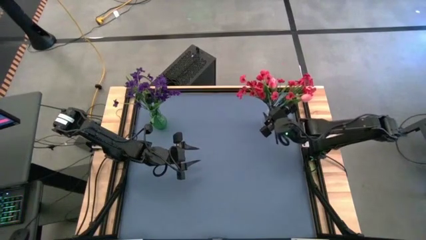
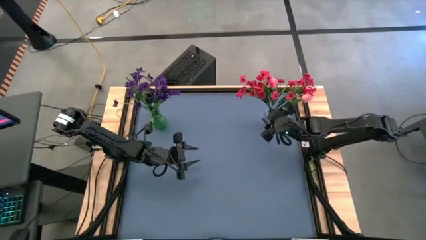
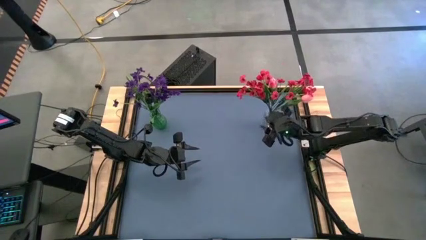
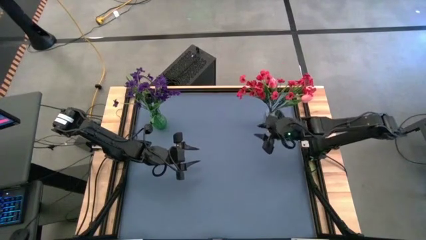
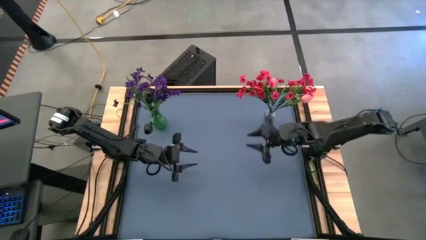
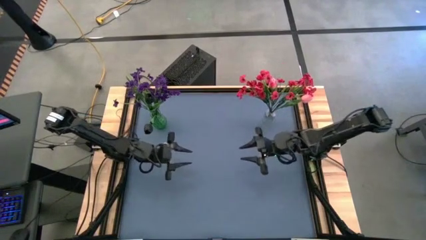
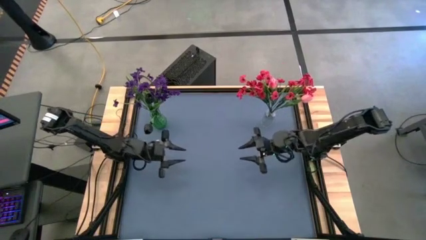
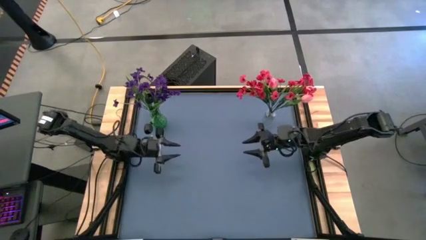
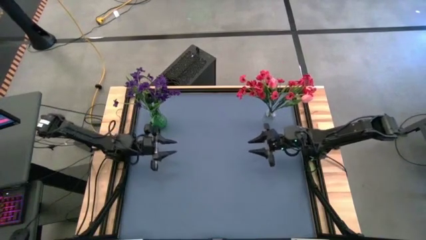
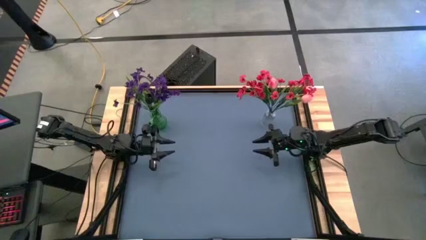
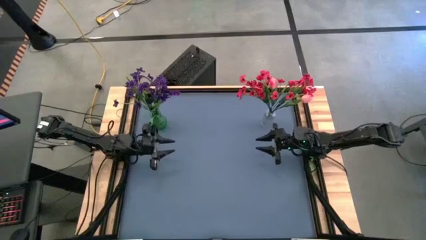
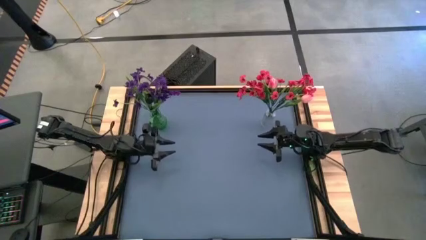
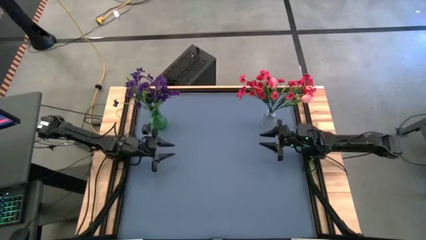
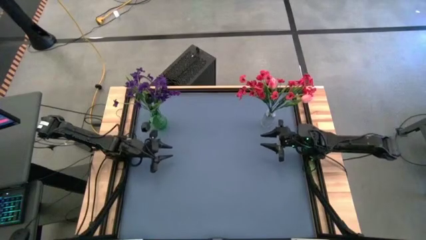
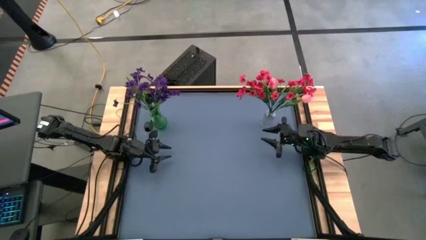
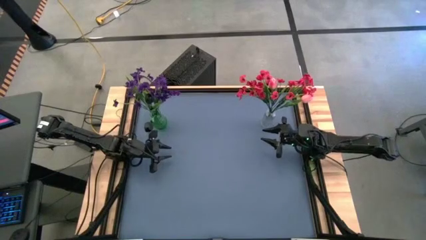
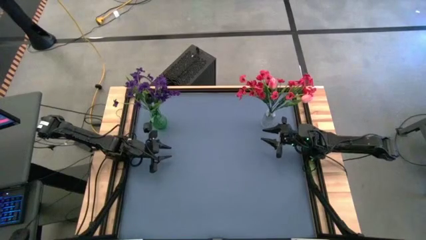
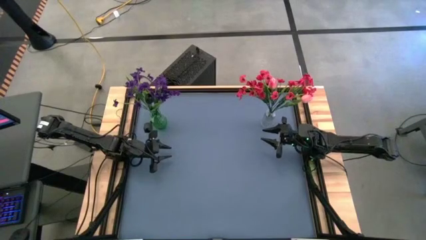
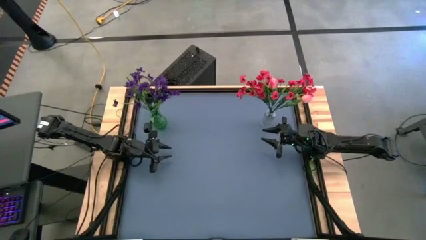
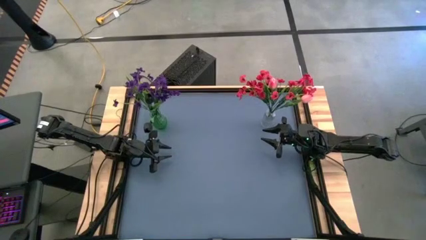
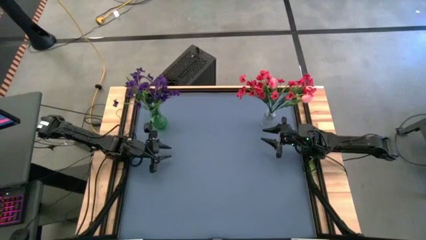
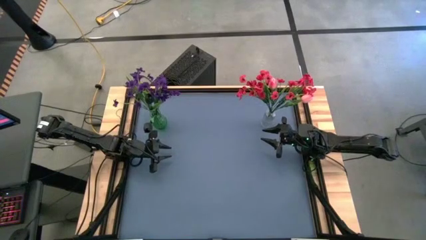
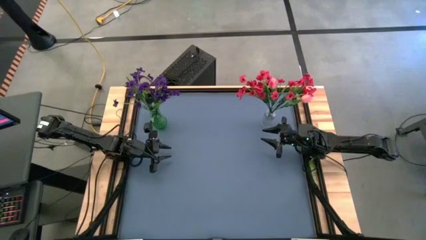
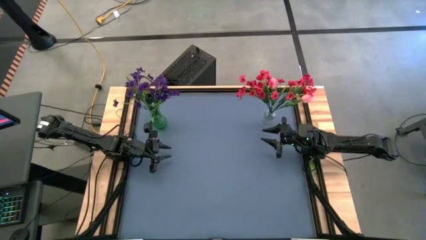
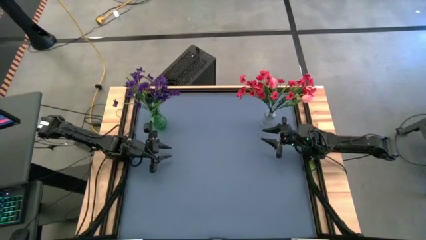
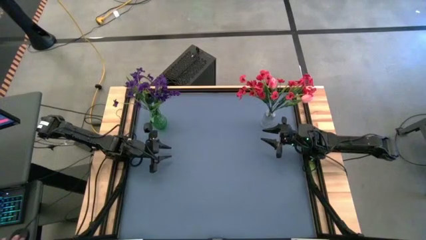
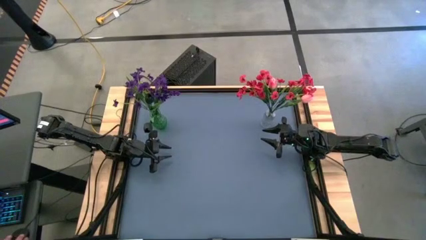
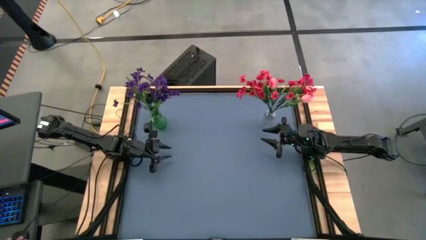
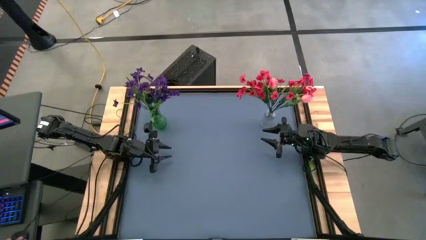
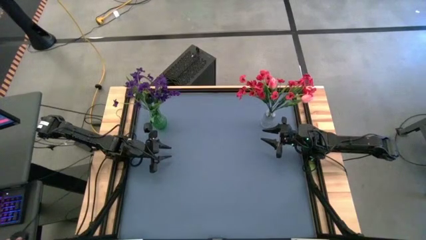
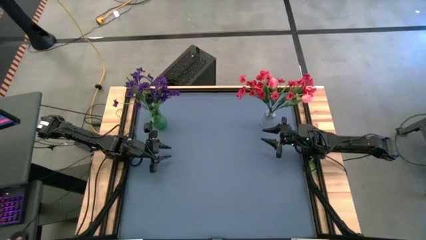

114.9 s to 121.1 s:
Task: Sort flowers into vase by color
Return to Home Position

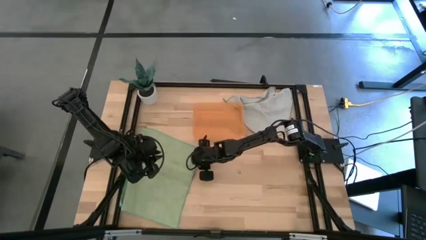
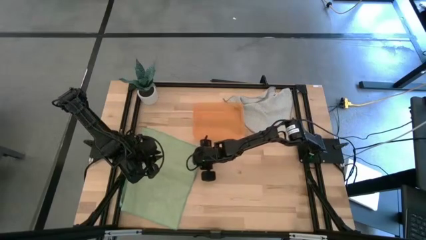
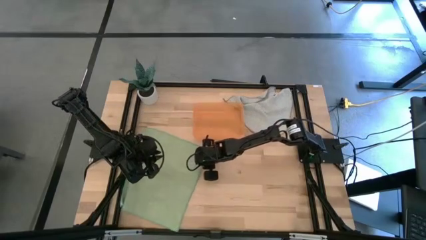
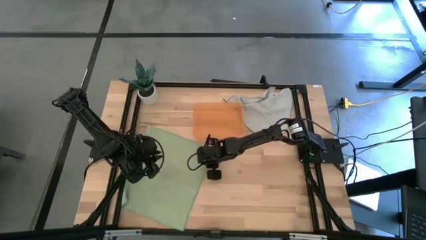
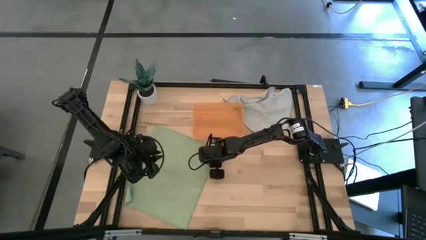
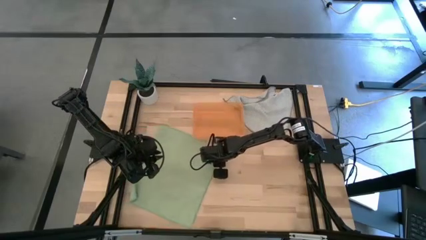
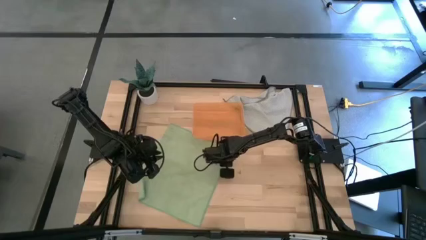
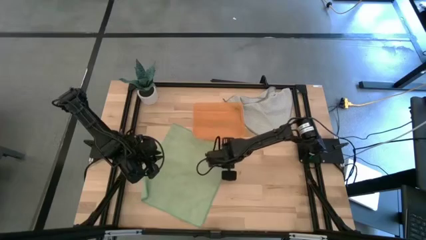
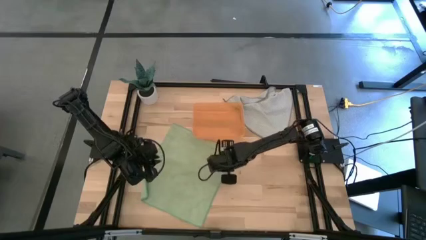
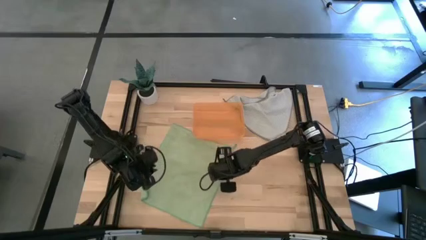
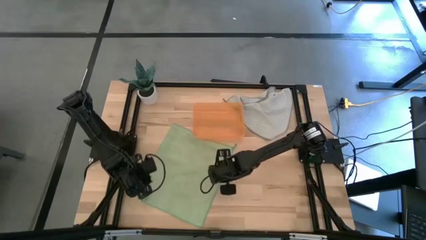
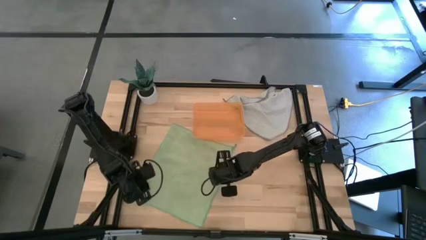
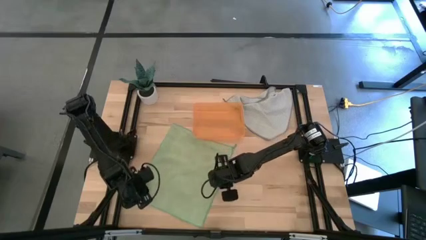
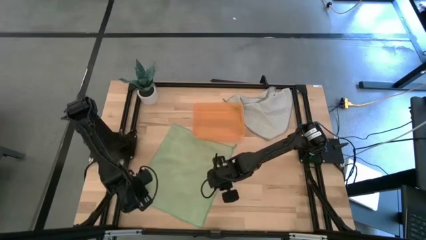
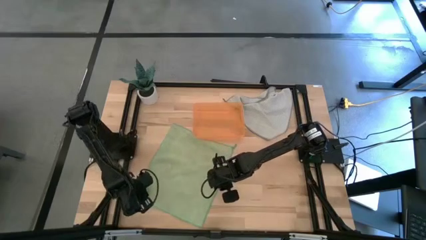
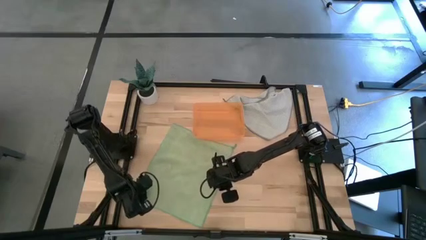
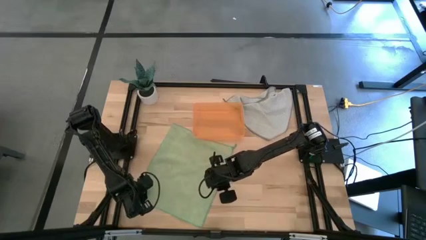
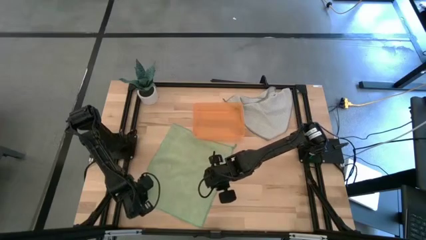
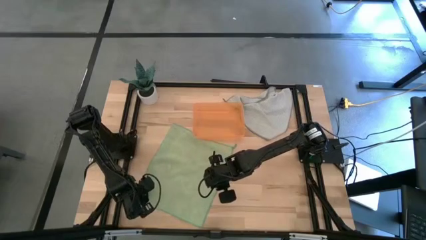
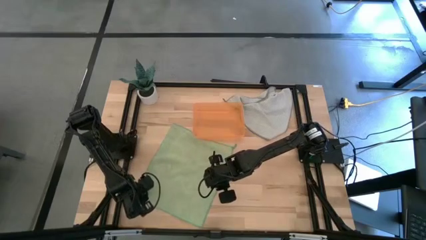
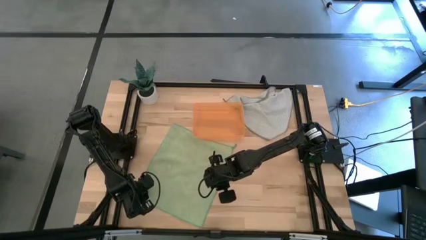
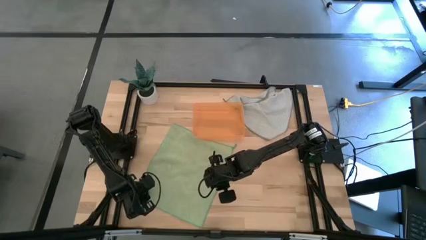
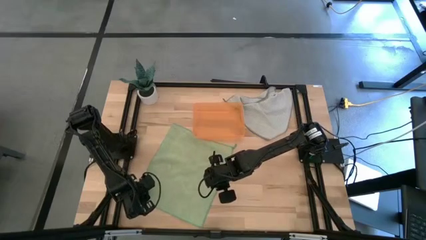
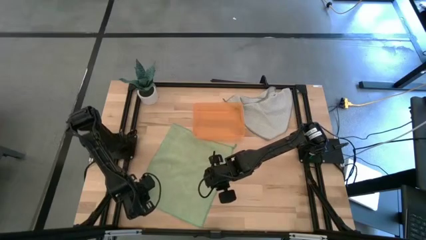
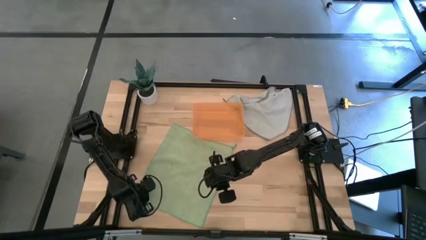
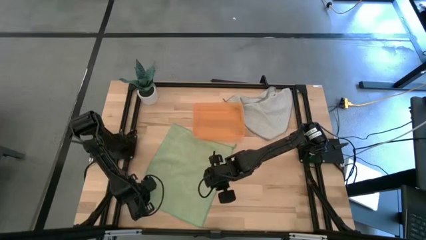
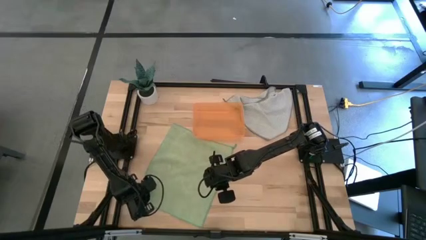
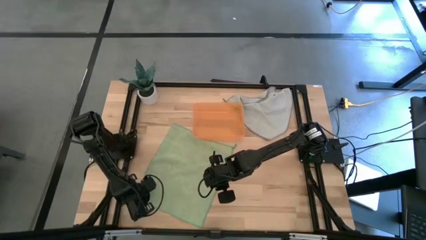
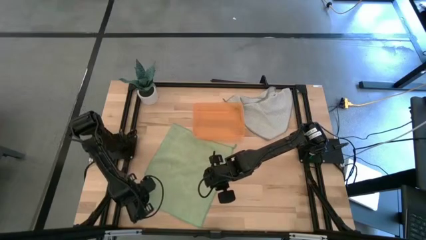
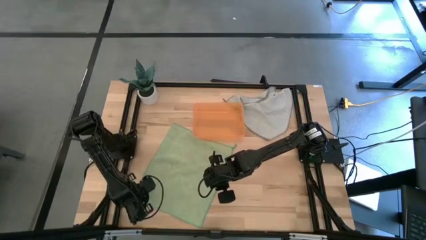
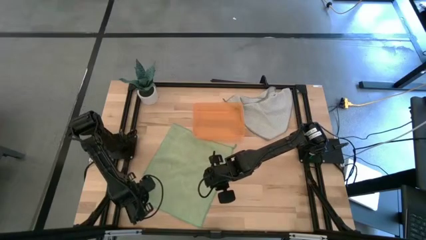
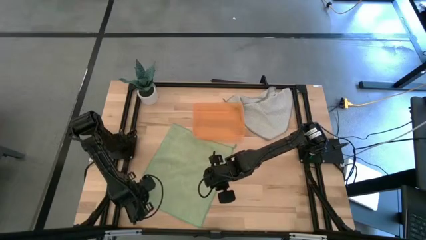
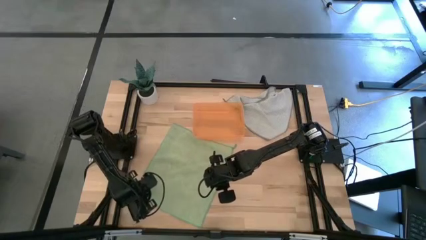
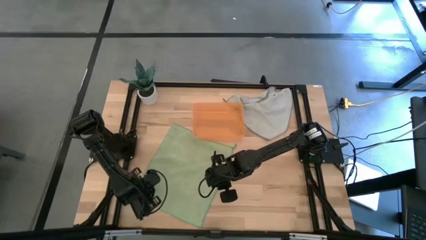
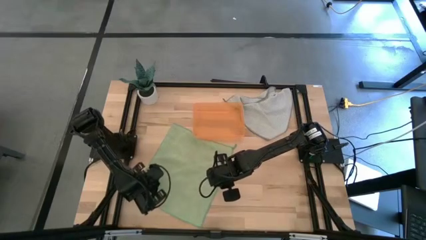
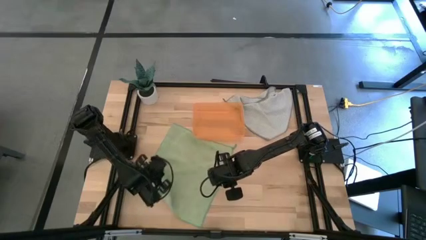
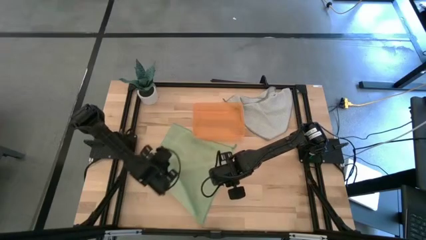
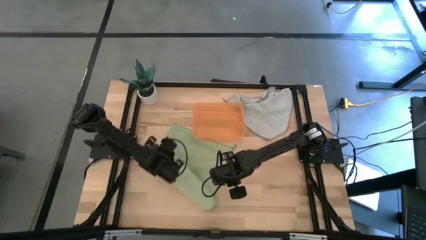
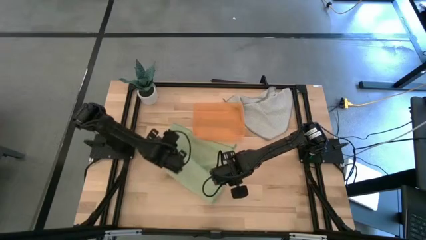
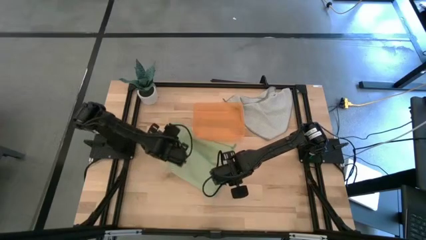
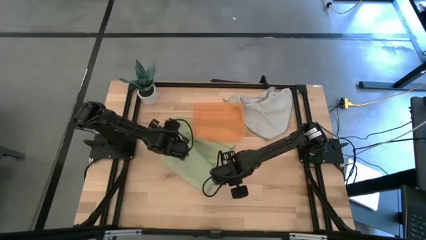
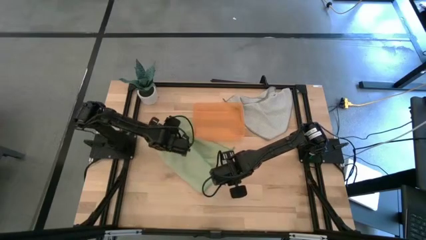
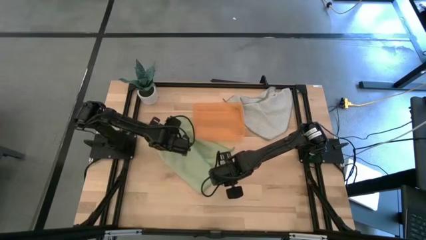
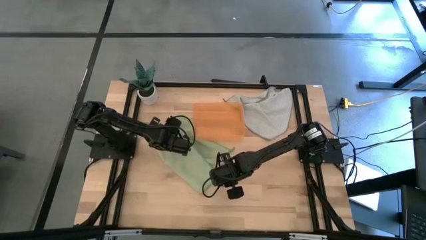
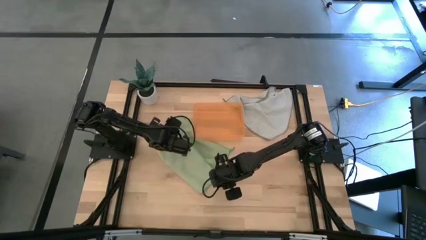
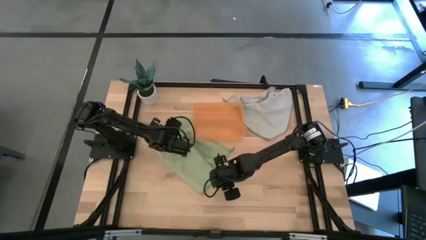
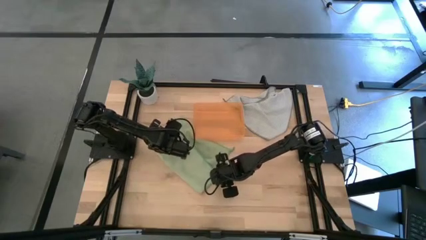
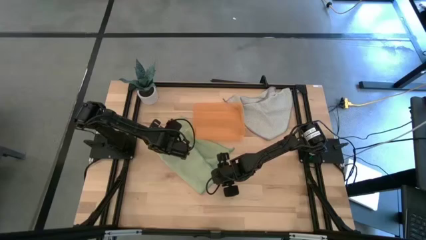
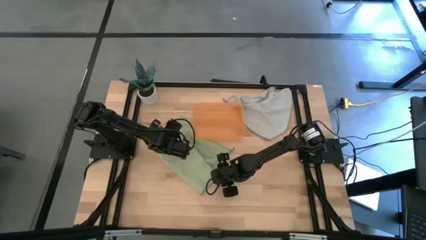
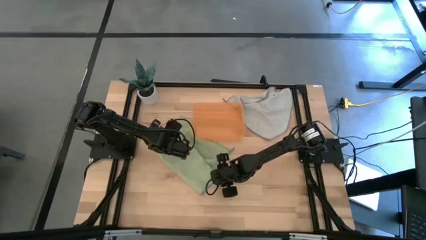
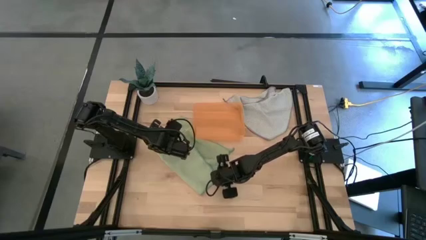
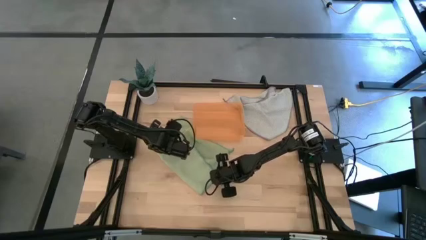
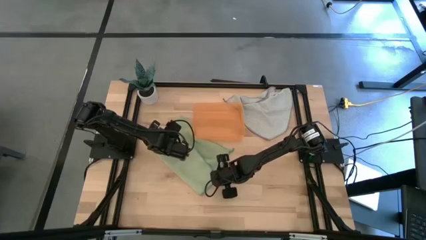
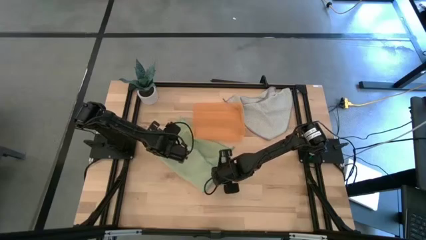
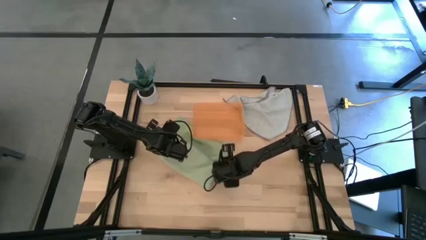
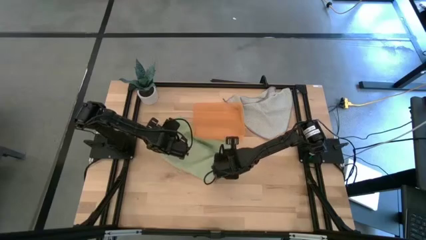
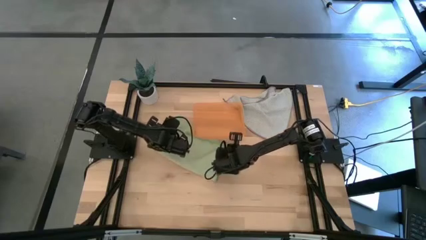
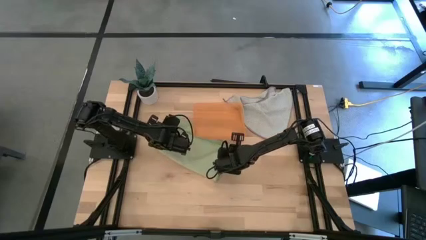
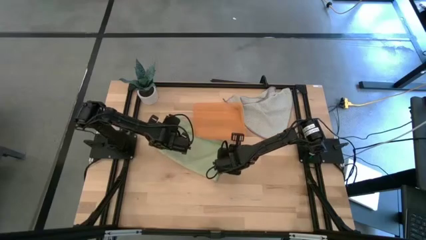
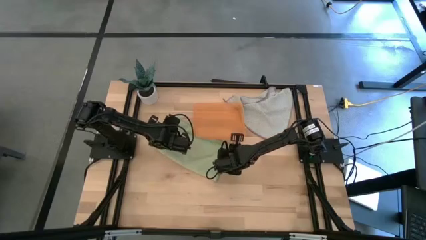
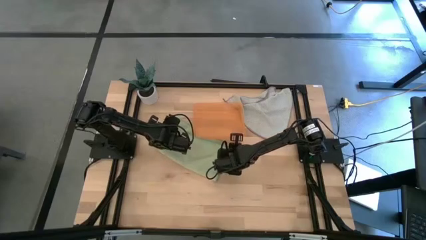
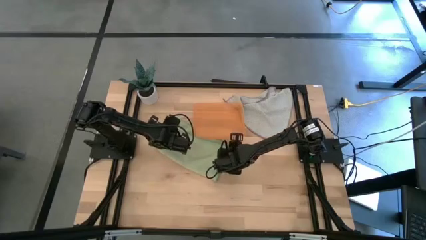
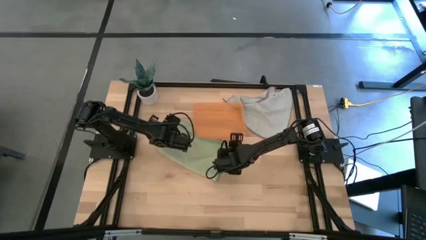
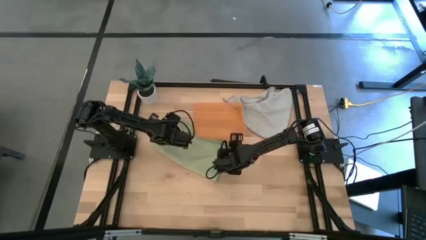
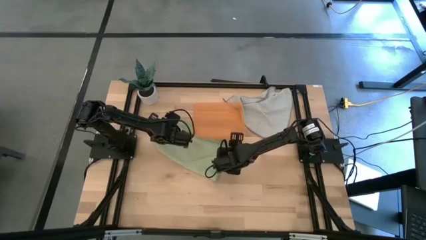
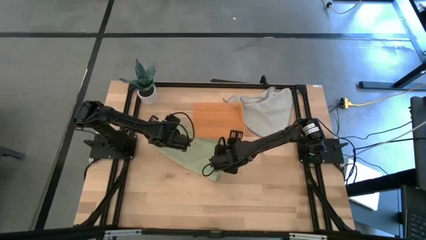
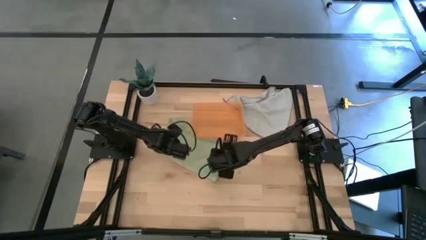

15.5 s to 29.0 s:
Task: Roll microfiber towels into tight, uniform cylinder then place into a basket
Fold the green microfiber towel
